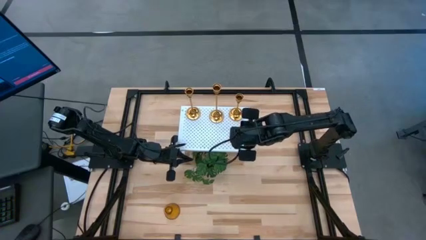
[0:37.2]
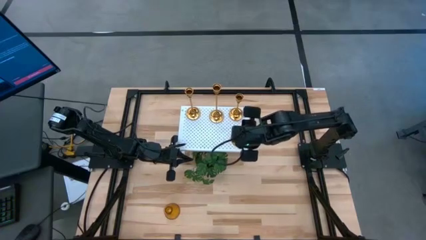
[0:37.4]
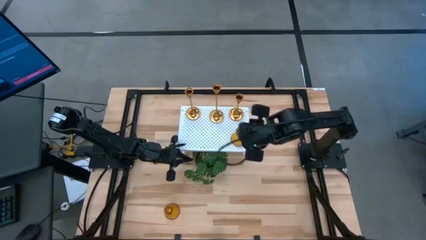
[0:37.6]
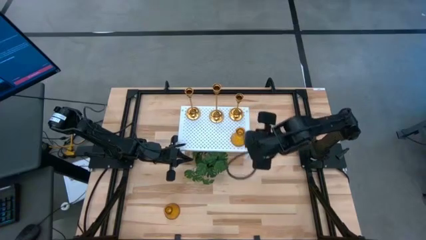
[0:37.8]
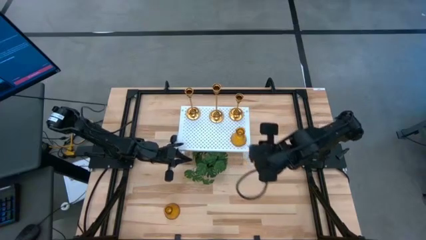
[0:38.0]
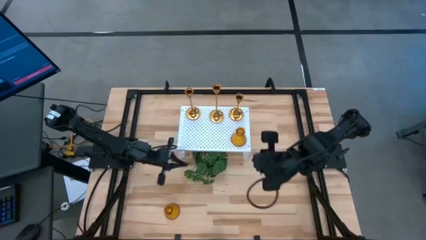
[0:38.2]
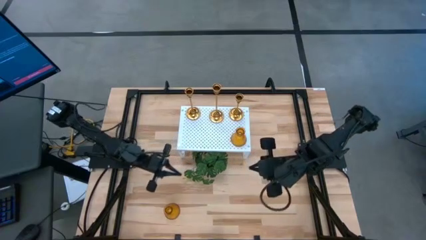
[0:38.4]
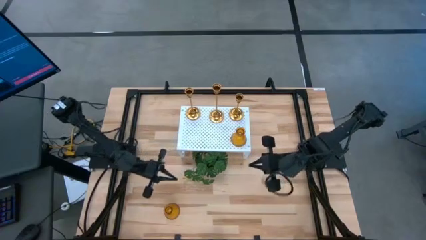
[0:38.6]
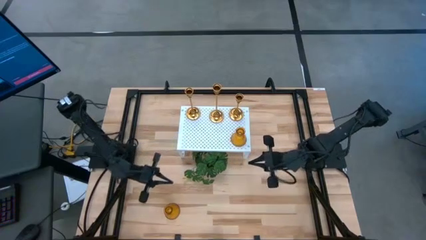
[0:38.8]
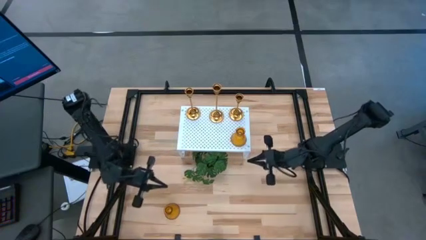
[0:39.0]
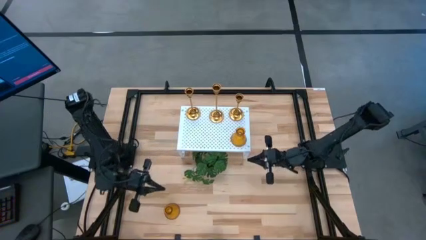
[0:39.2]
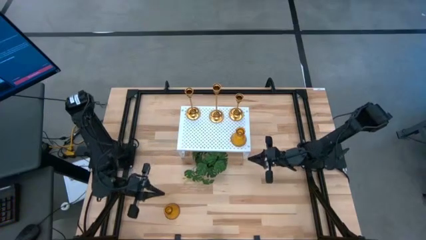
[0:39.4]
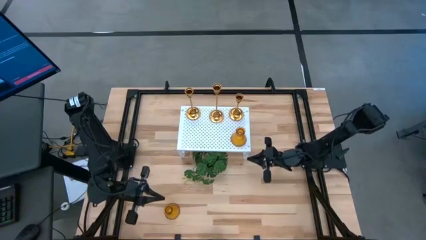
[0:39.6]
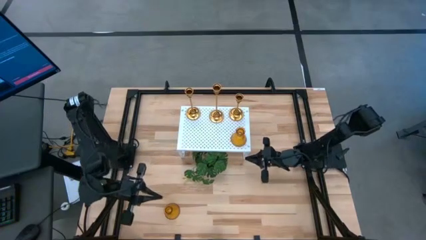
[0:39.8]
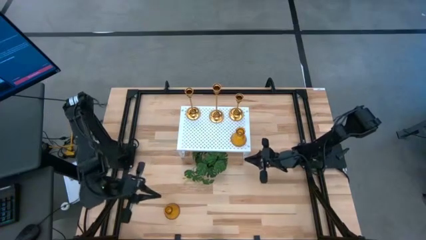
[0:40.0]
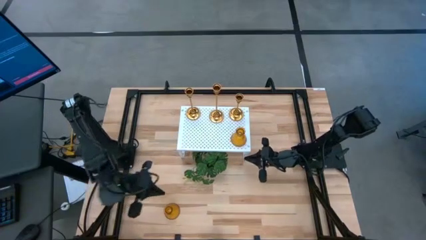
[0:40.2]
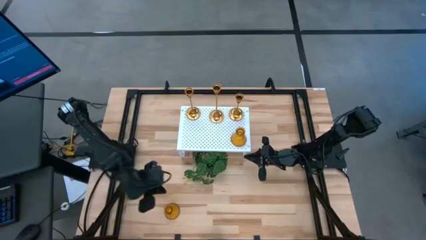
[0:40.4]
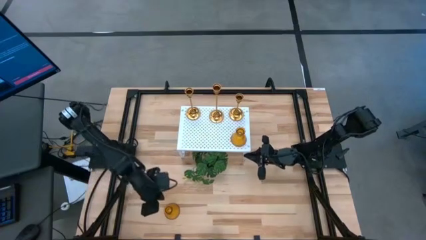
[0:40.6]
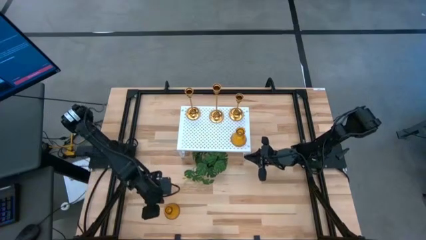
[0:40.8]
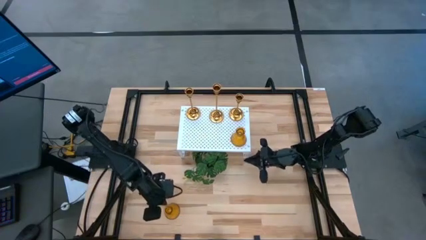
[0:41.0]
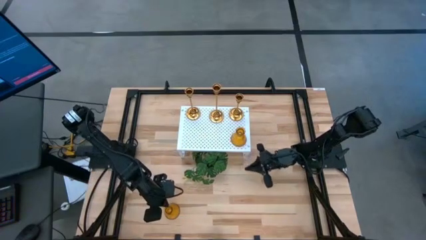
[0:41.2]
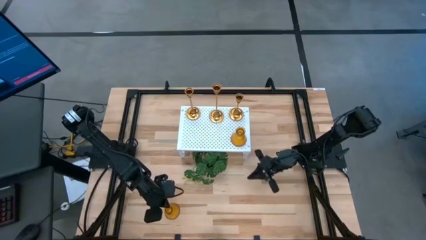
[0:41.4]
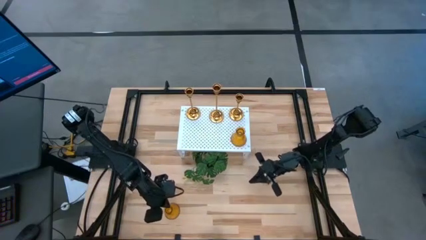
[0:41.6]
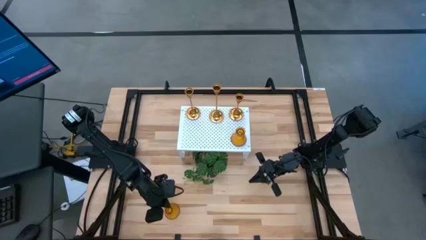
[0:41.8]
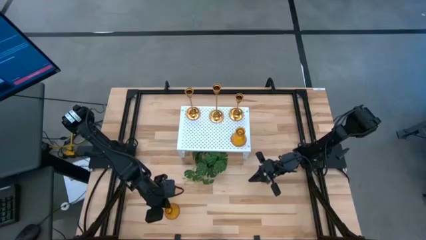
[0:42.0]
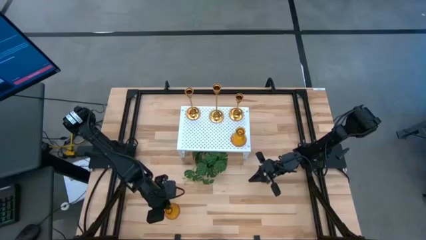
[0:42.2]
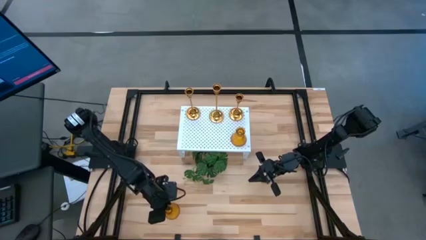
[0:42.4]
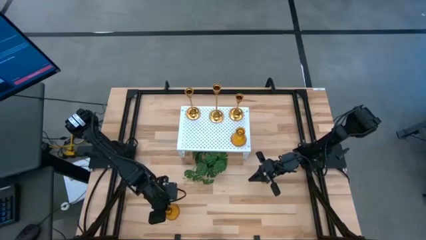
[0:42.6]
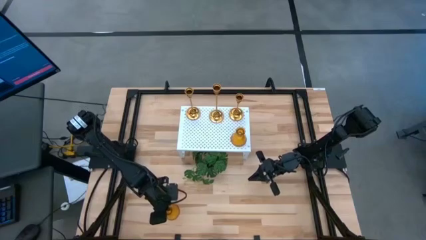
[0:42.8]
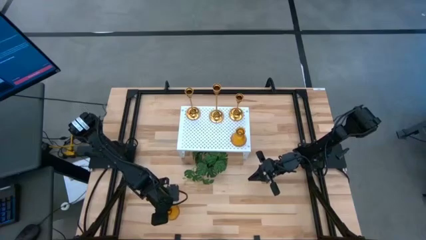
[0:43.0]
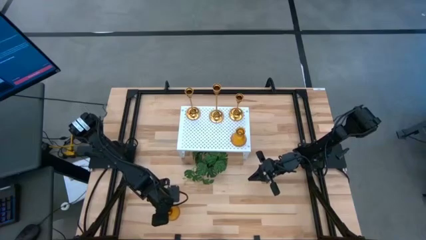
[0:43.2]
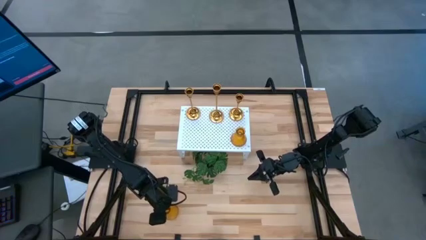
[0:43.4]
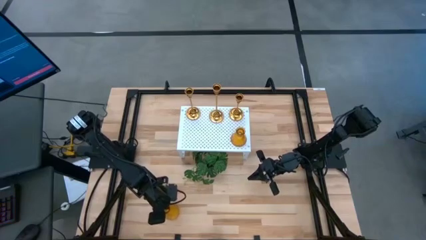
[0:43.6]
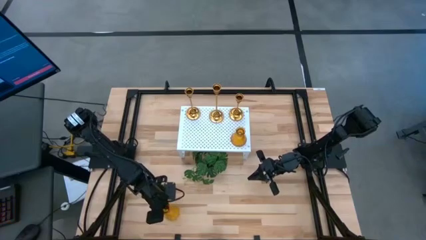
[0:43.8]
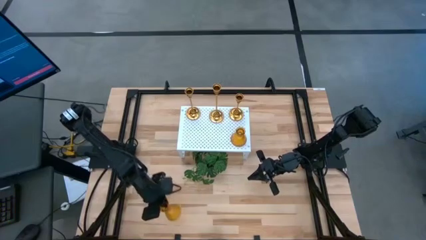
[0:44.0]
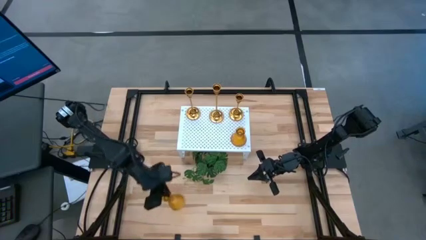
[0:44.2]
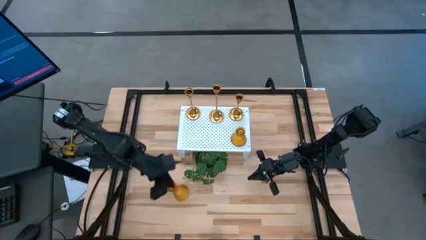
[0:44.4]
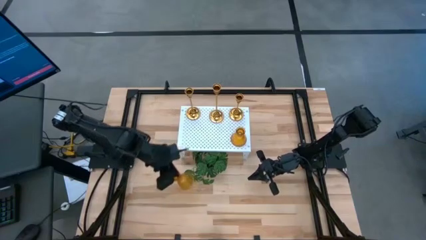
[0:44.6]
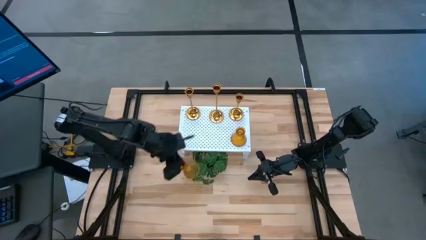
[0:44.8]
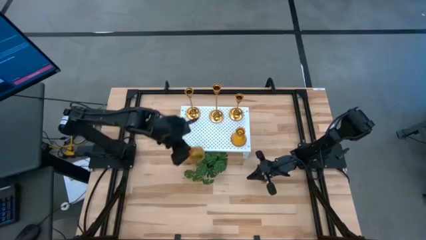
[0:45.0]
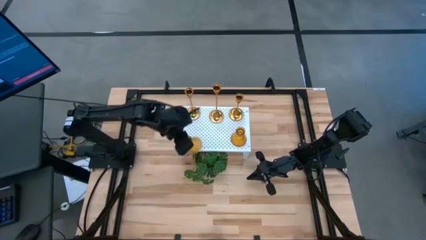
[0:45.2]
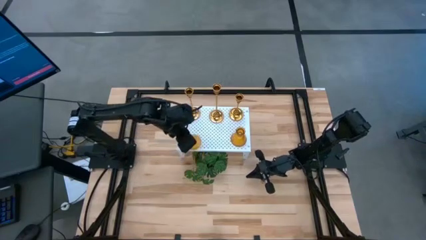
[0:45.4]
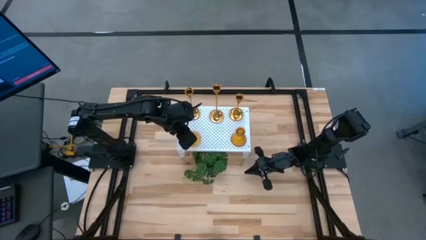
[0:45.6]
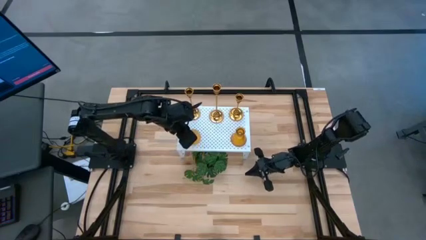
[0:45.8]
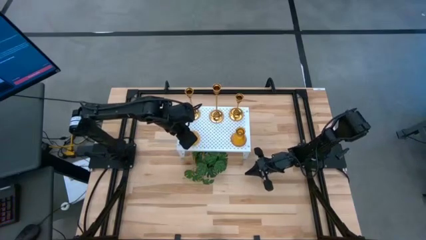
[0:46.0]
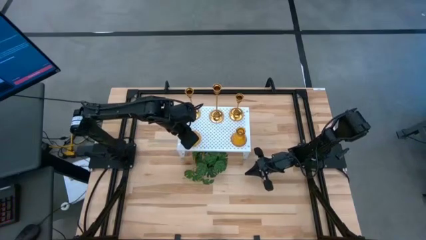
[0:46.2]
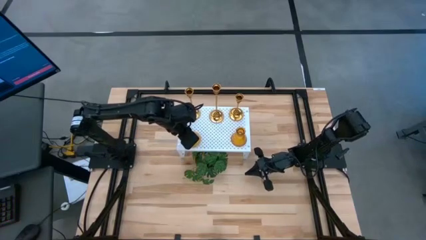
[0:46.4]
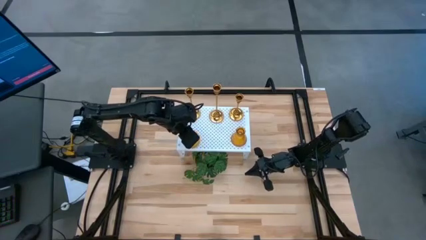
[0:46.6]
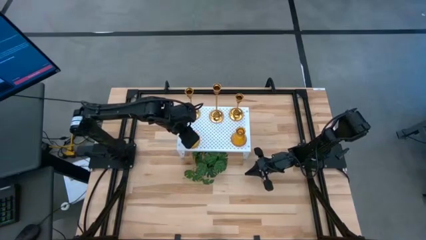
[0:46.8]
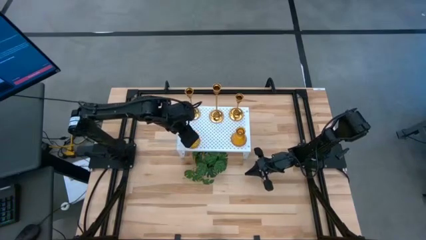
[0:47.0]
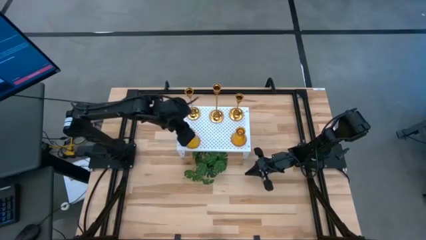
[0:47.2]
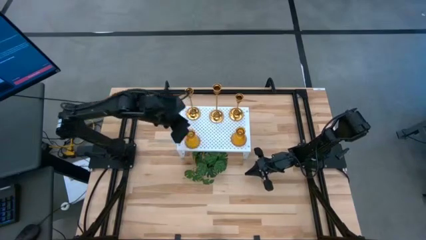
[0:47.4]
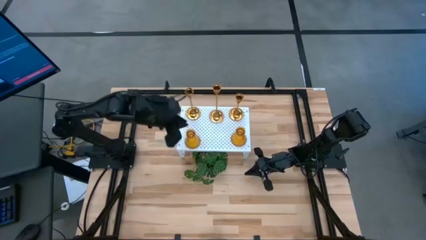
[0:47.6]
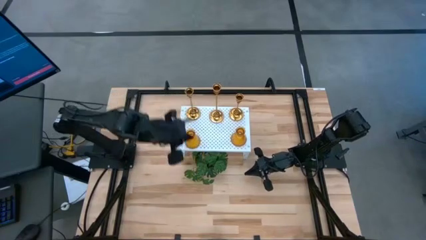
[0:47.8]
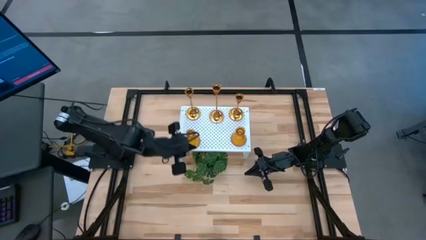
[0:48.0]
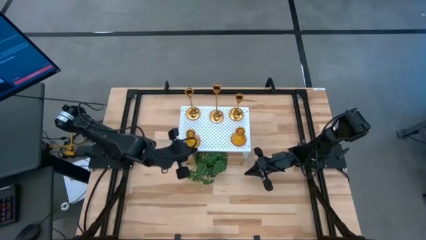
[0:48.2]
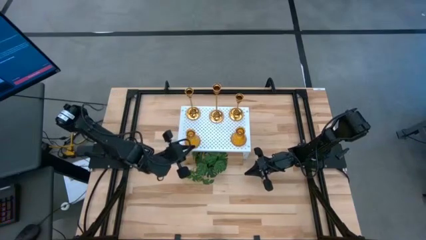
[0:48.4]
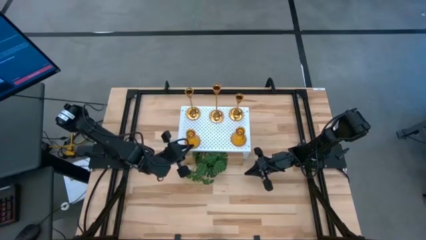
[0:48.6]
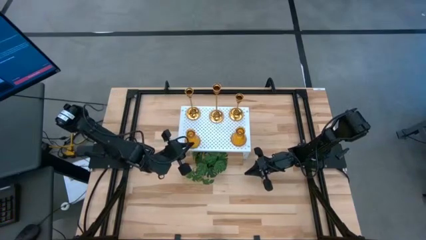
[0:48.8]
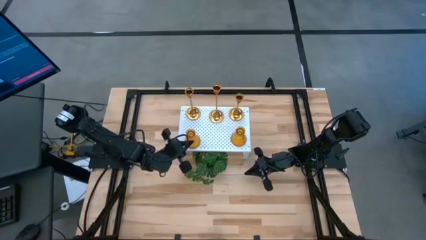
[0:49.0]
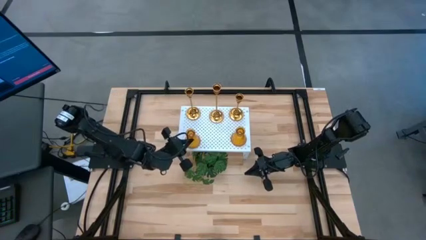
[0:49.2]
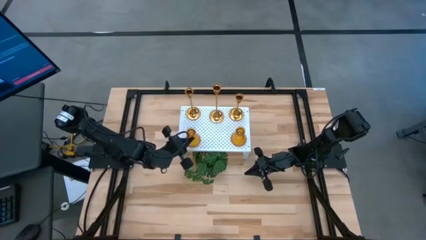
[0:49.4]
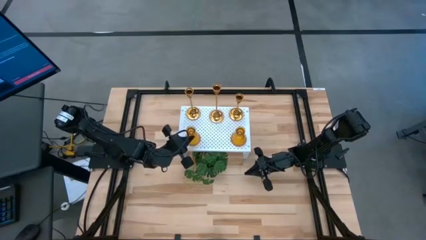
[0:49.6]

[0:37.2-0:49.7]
Task: Pick & Place candle stick holders
Put the orange candle holder on the shelf

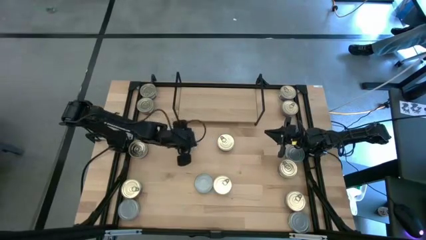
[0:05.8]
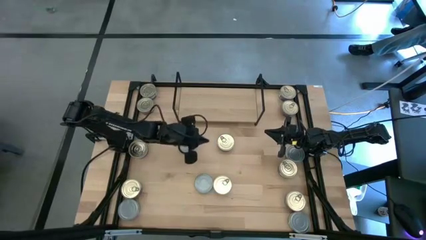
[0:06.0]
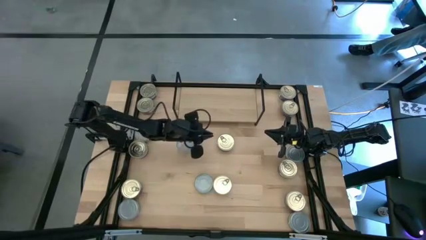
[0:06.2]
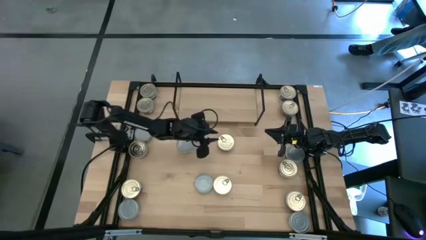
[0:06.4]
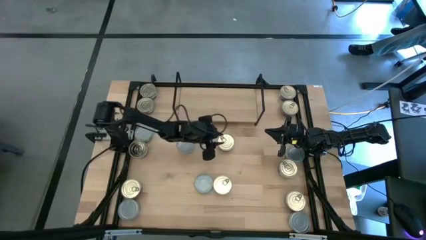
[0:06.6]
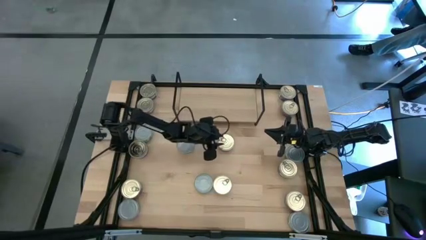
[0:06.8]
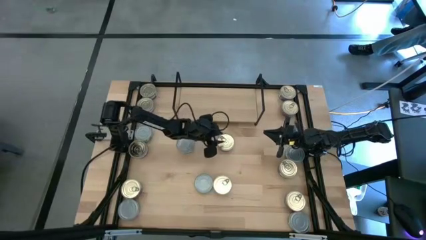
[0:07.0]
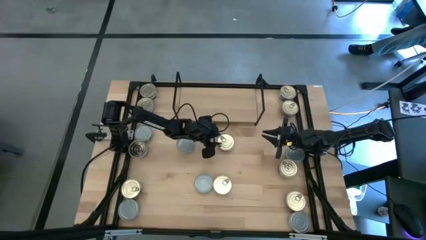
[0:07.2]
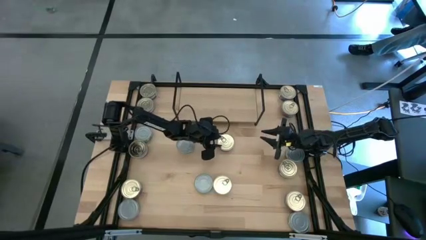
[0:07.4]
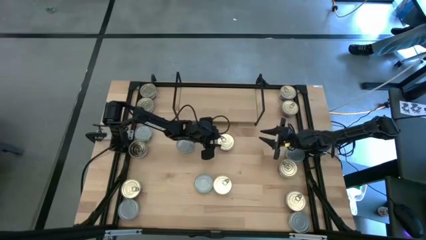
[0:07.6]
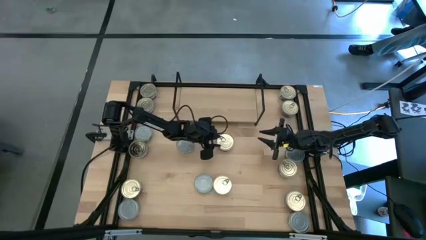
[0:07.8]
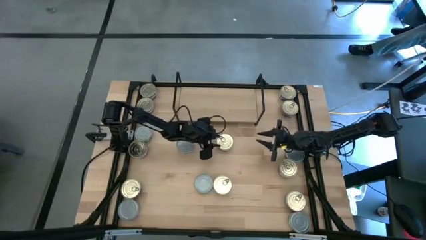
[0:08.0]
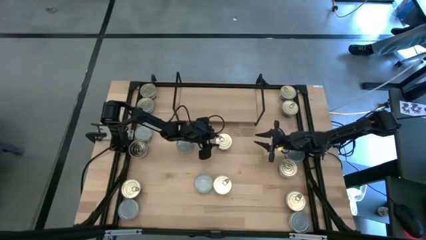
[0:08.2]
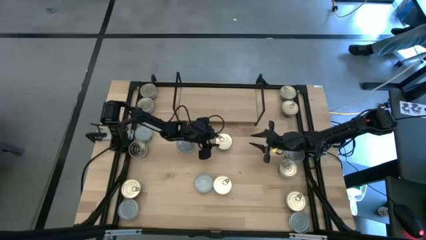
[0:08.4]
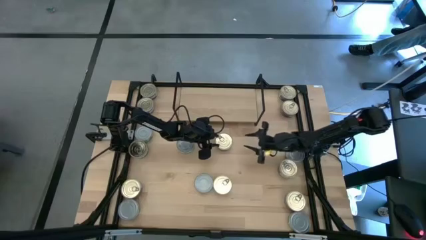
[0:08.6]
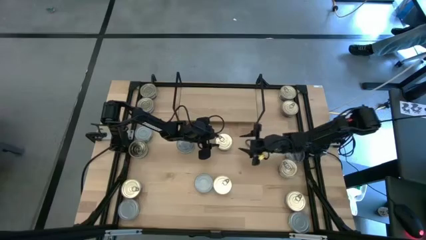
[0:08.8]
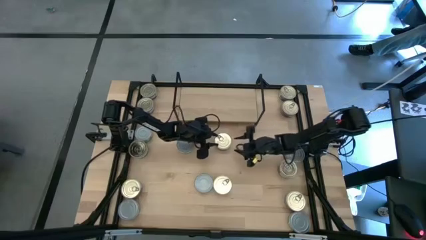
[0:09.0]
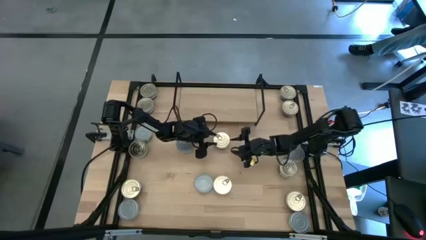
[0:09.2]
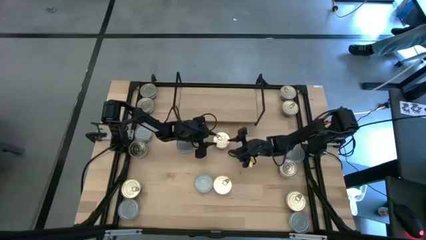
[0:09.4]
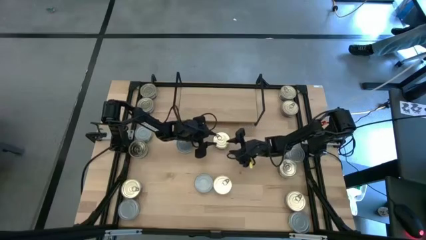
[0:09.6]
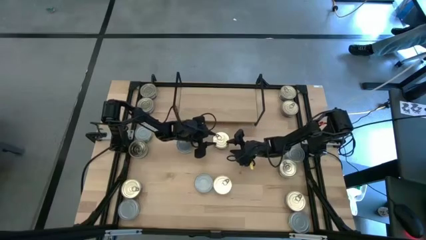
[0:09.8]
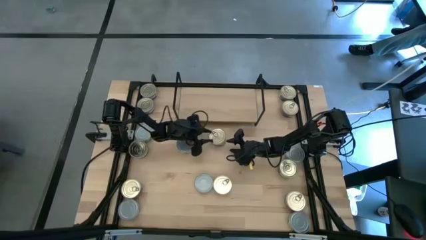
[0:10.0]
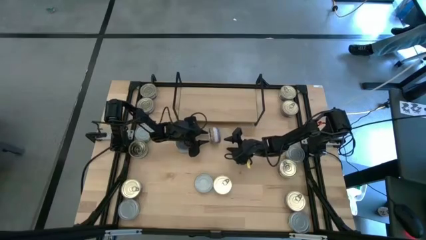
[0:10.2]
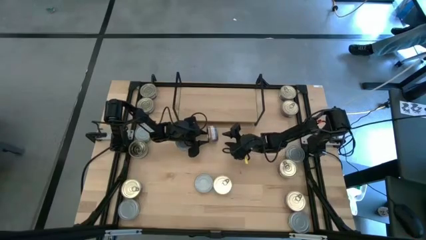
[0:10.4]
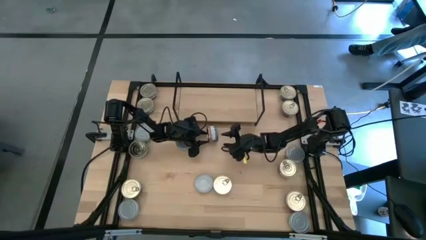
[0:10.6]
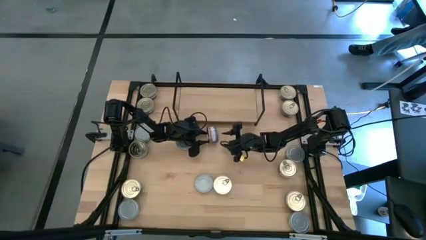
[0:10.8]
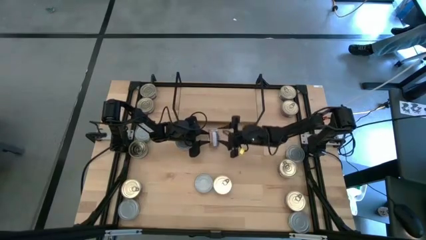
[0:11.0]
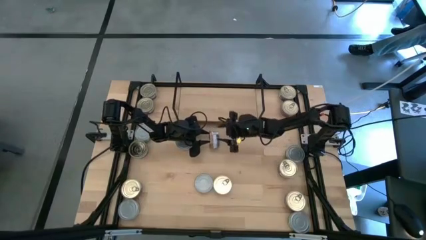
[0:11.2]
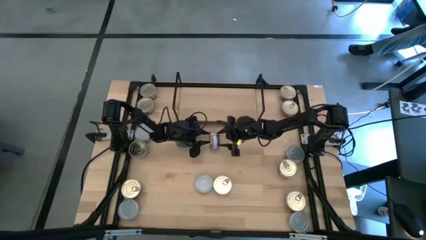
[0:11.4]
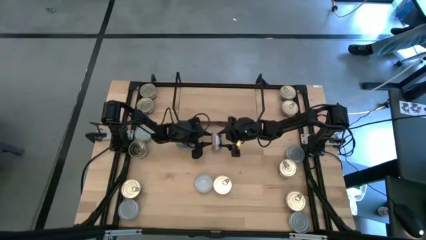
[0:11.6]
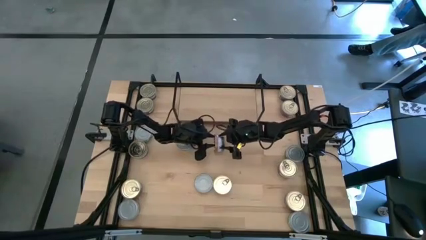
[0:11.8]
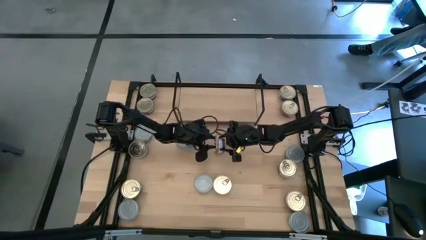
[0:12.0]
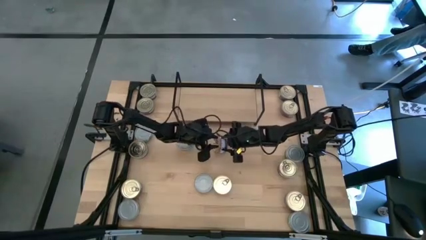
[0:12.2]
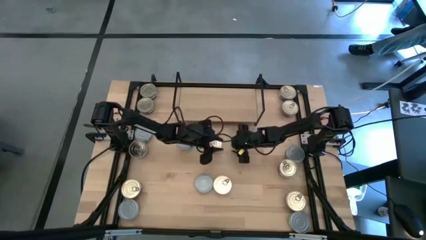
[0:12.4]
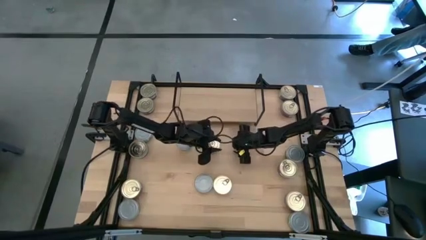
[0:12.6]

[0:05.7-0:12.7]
Task: Stack canned seafood by type on shelf
Put the blue pink tuna can on the shelf
